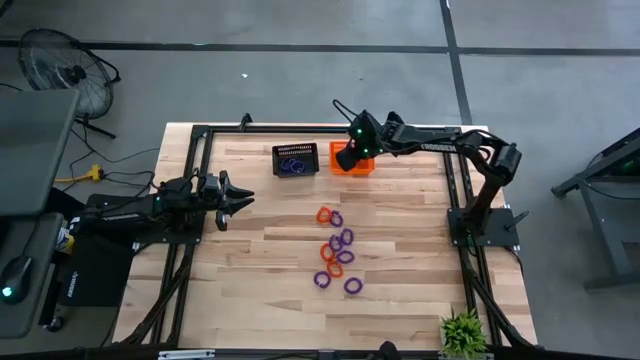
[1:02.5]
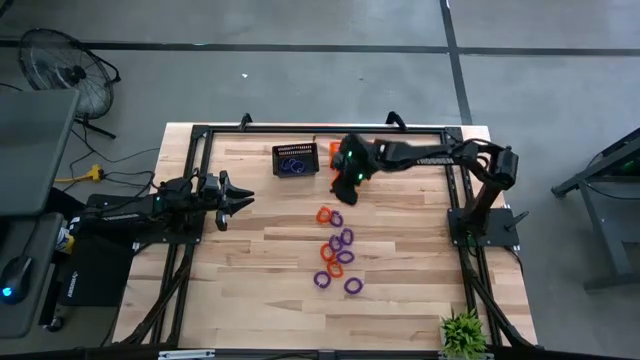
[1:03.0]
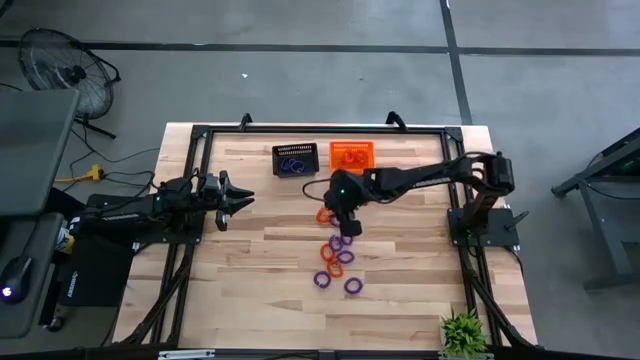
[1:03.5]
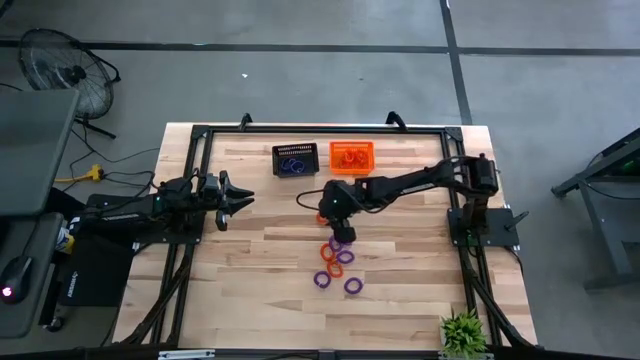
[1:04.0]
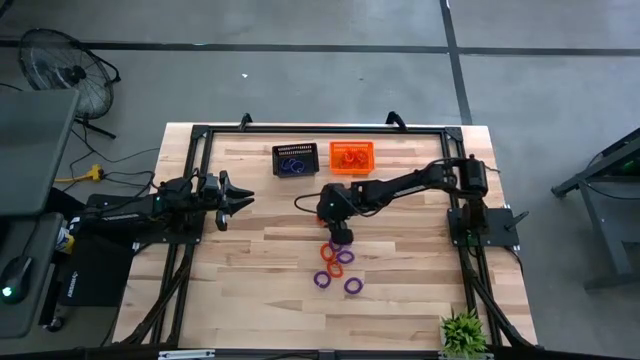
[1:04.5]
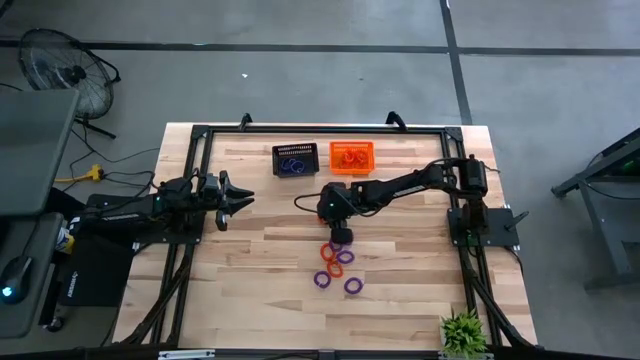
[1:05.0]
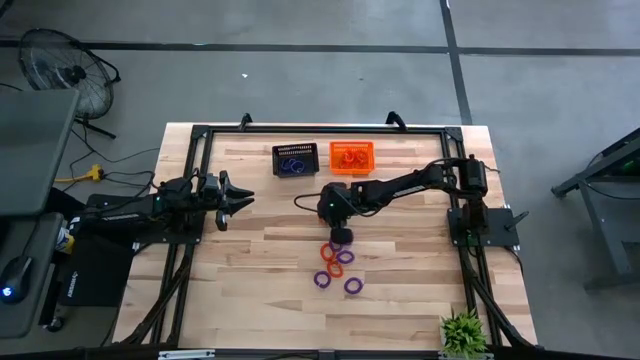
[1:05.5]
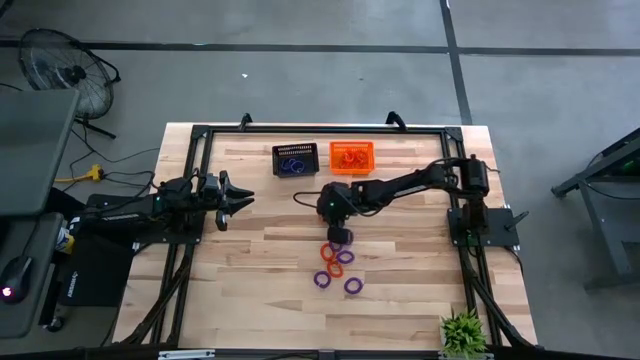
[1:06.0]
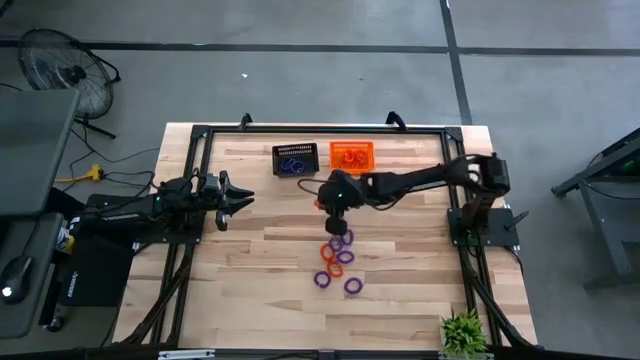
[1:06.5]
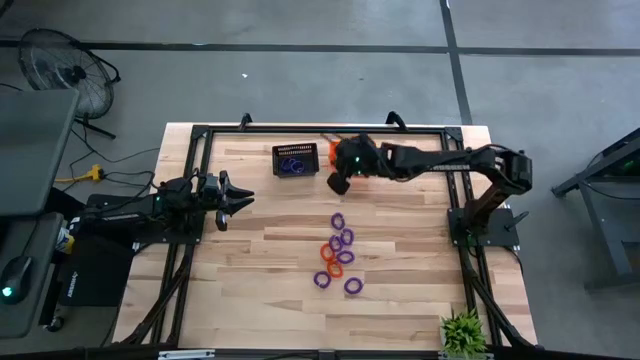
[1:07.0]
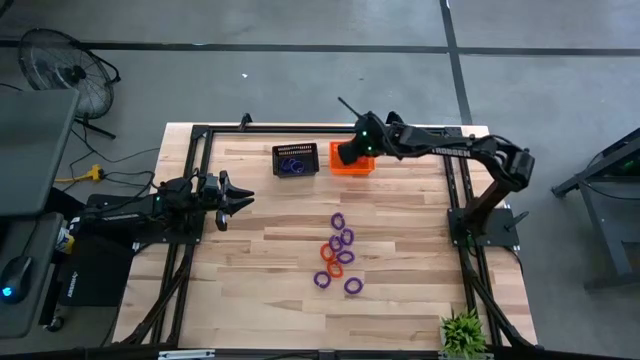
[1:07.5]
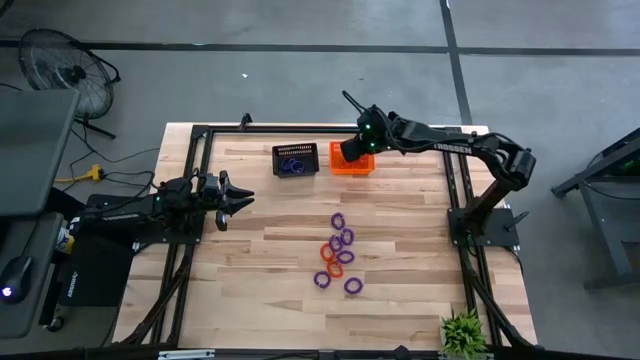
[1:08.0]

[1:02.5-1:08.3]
Task: Sort spring keychains
Put the top orange spring keychain into the orange bin

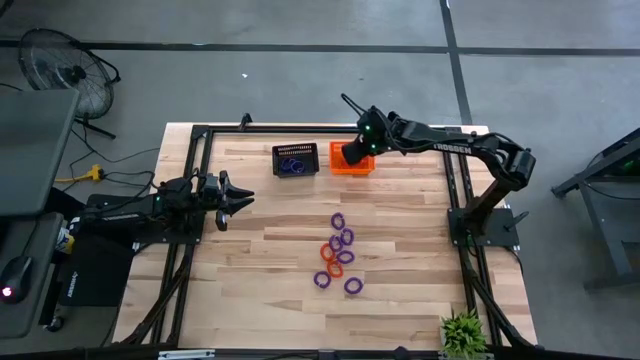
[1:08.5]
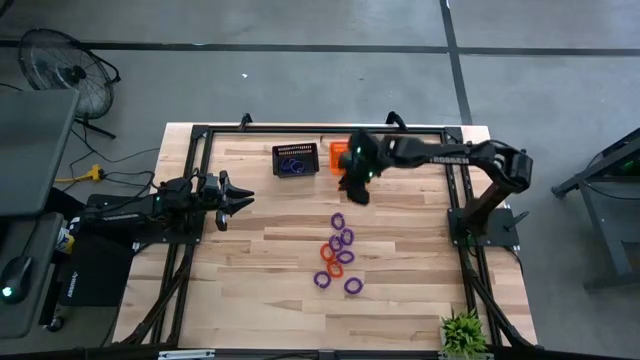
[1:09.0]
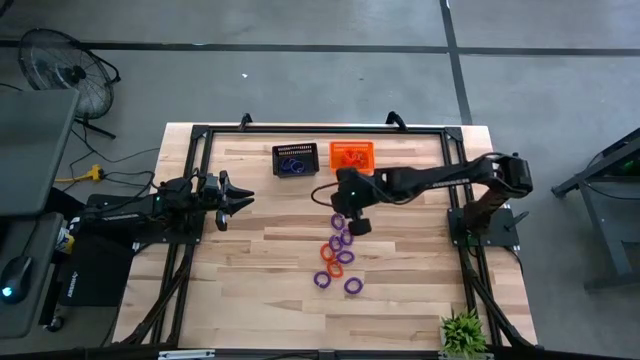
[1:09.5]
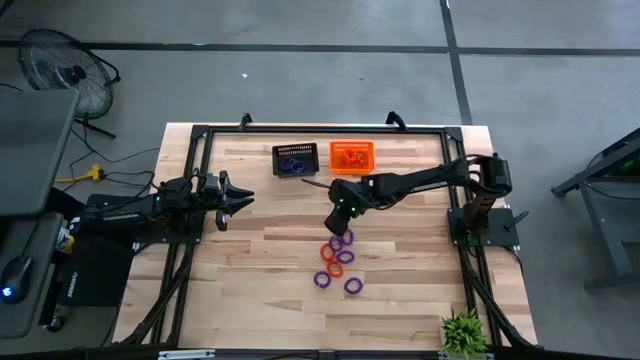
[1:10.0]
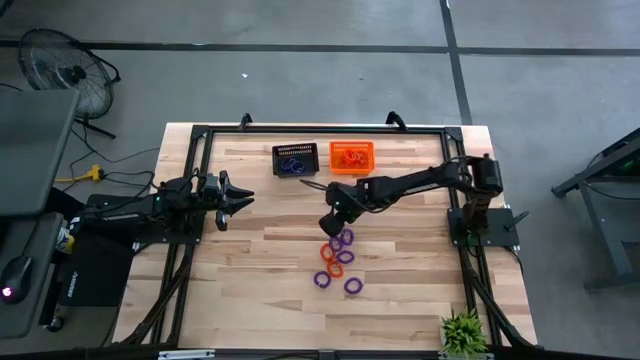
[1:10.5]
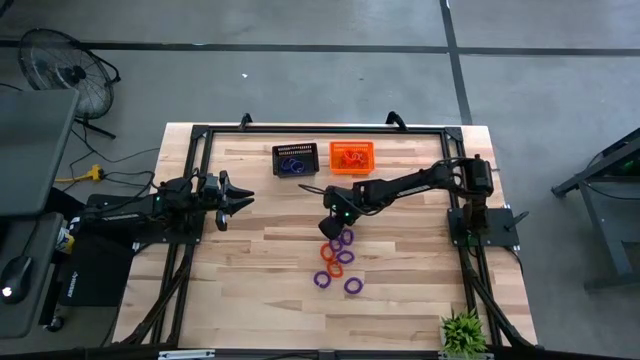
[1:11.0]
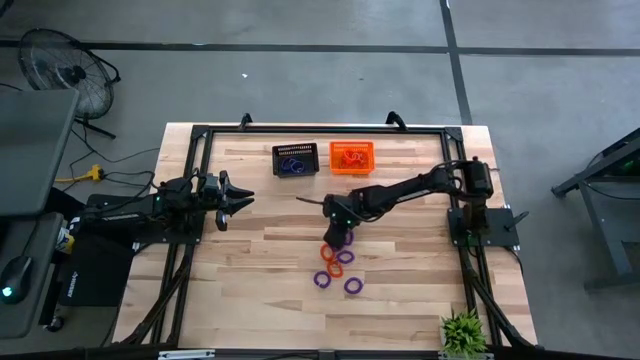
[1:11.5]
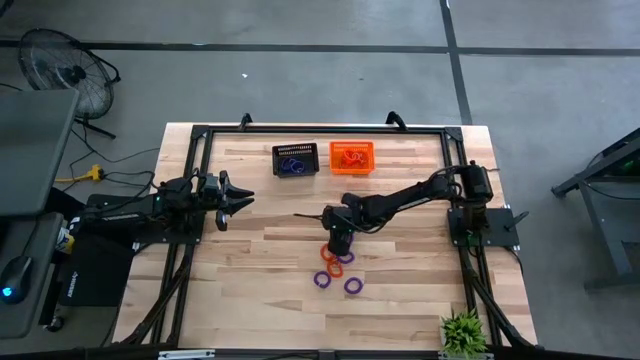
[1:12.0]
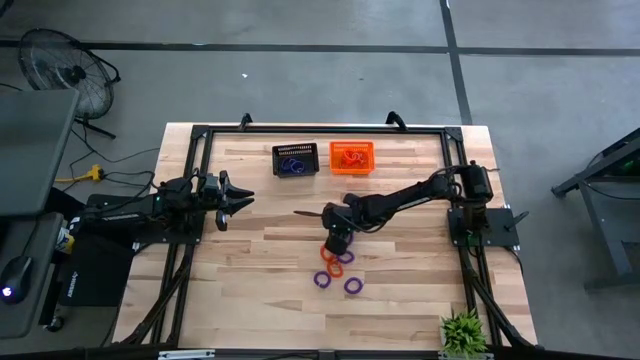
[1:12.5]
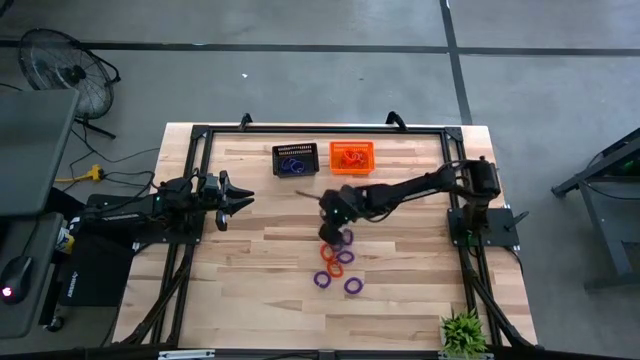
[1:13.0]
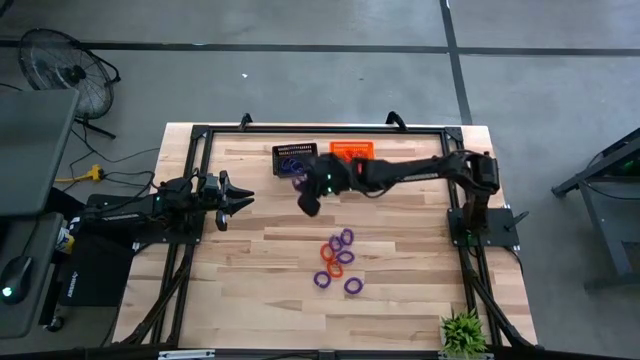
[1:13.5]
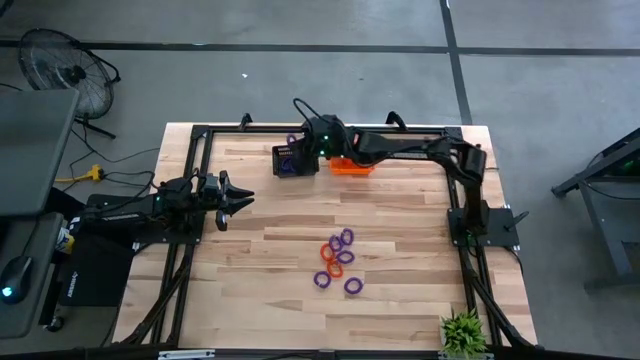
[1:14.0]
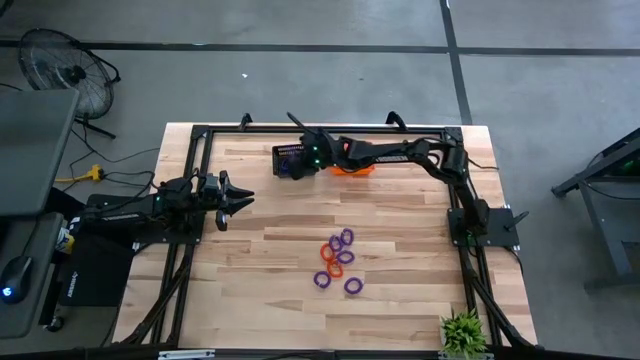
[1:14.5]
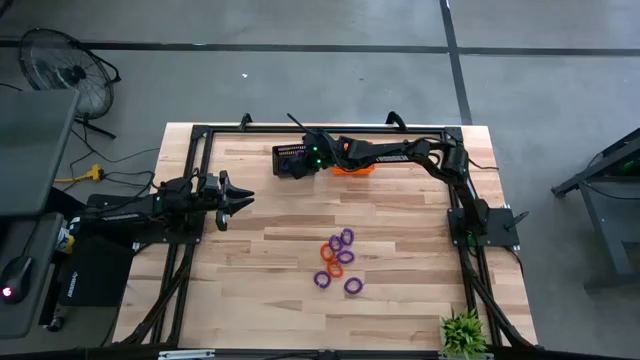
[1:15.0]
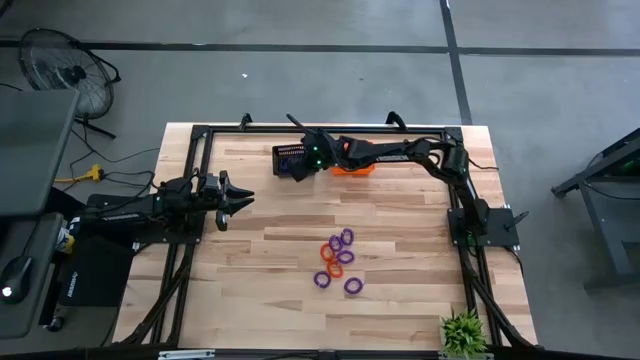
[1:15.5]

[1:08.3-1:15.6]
Put the purple spring keychain into the black bin

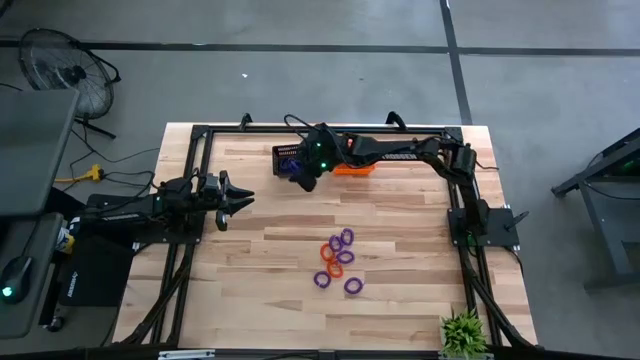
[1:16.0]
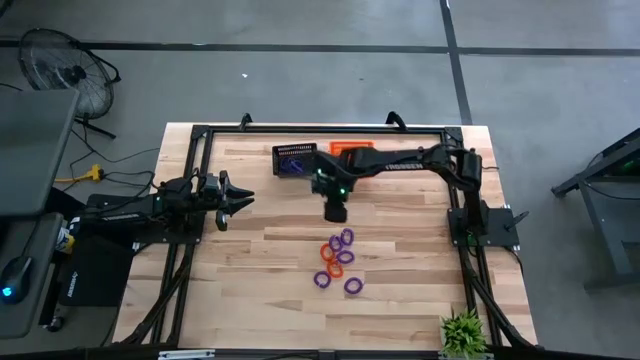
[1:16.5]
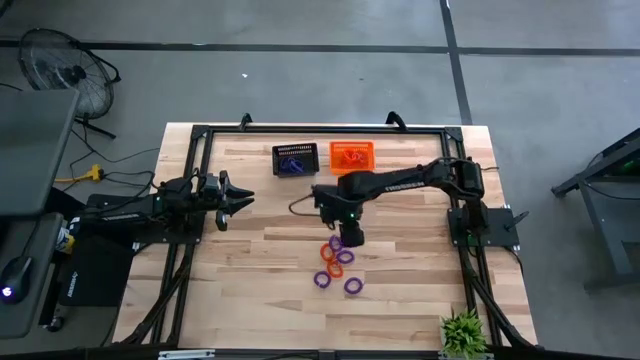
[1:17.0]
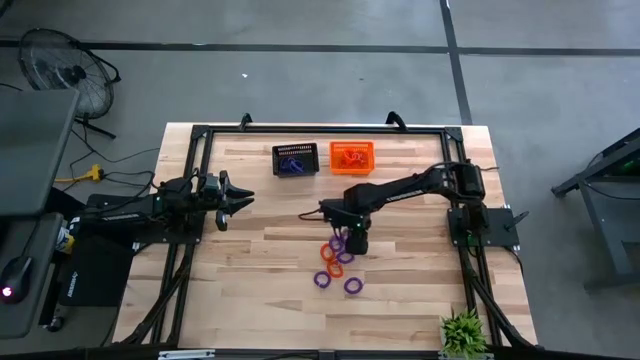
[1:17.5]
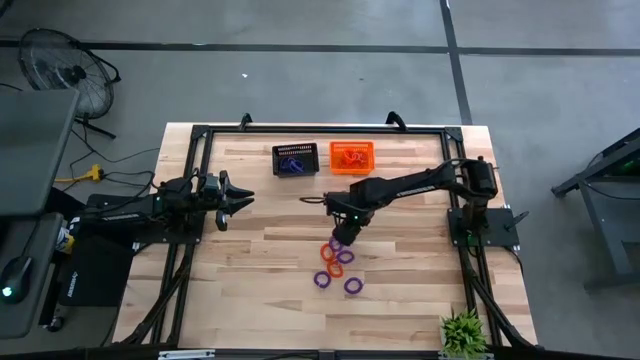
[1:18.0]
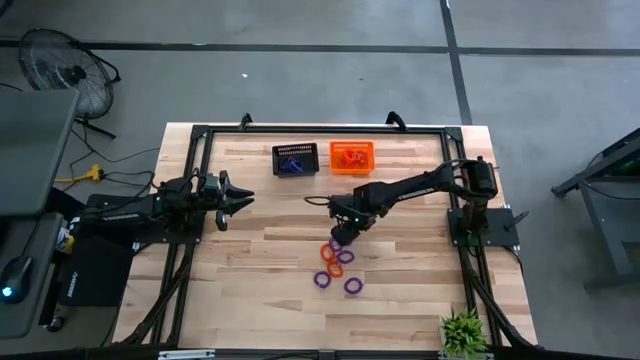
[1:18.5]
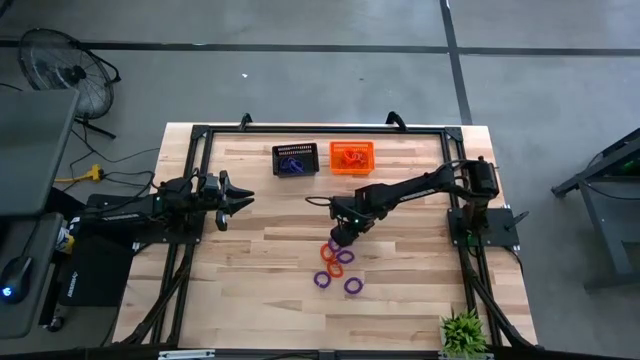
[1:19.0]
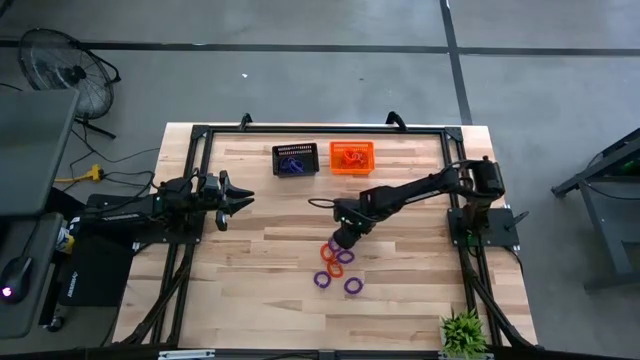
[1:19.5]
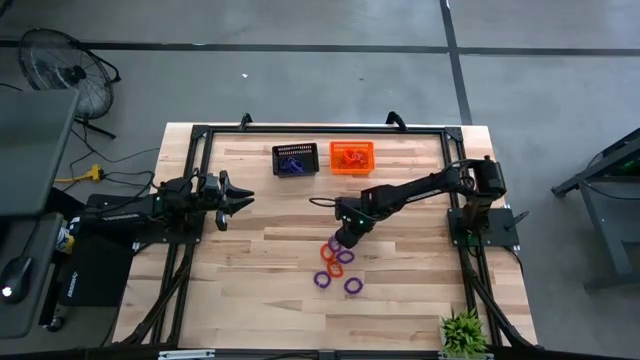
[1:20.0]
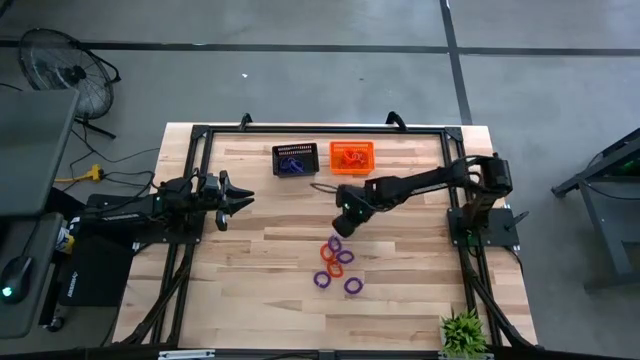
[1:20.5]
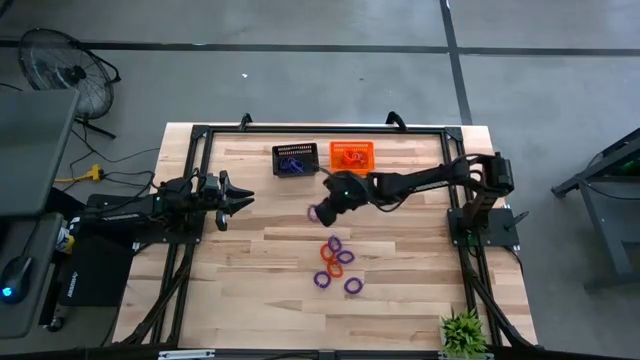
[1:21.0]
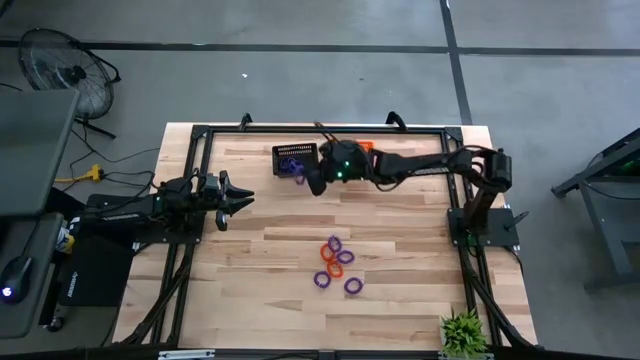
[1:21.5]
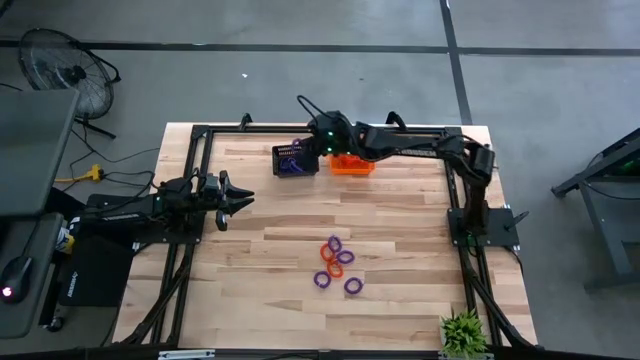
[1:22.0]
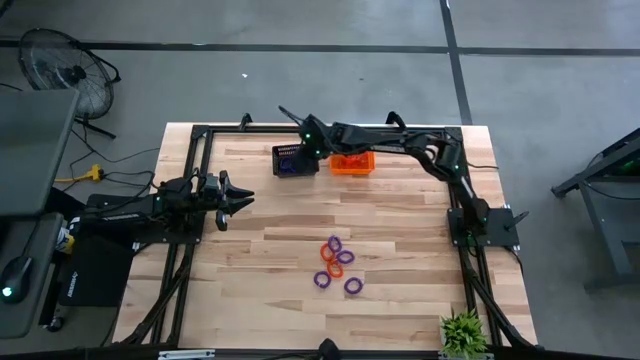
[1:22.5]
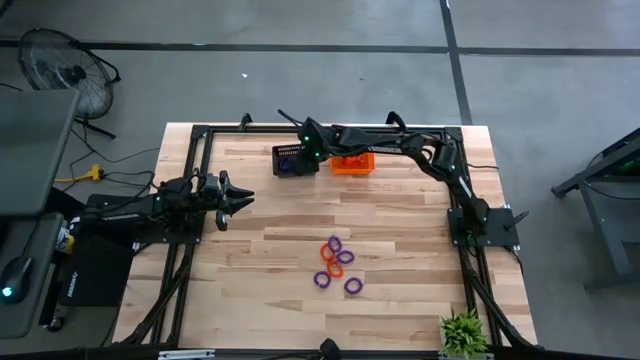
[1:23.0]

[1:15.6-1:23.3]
Put the purple spring keychain into the black bin
